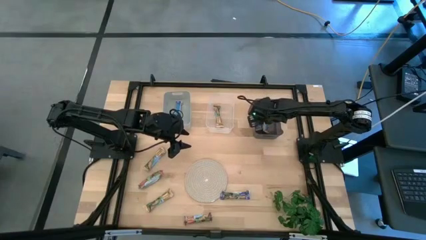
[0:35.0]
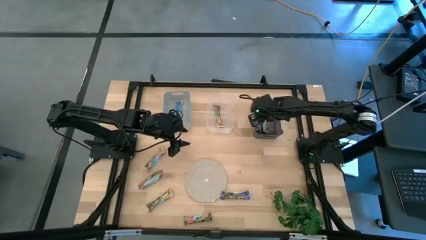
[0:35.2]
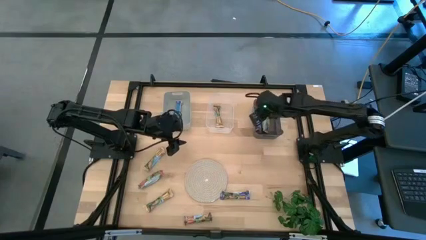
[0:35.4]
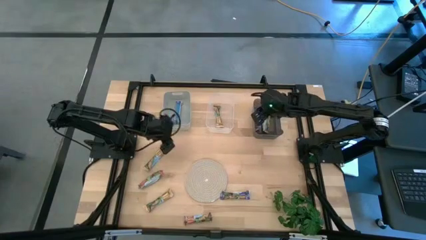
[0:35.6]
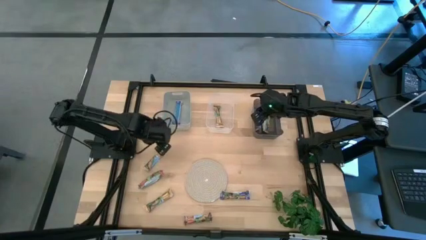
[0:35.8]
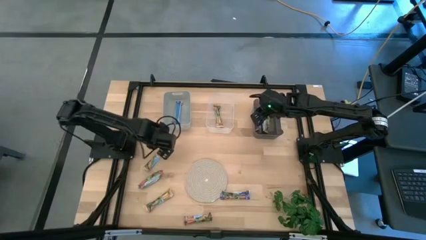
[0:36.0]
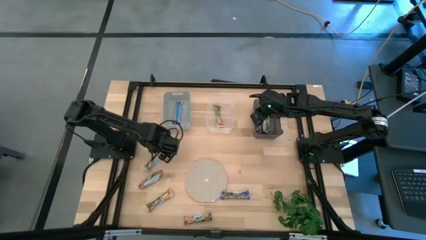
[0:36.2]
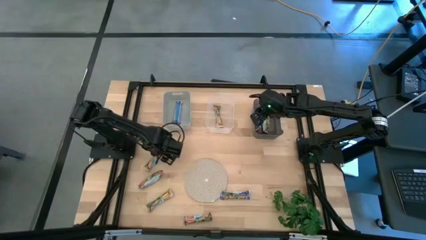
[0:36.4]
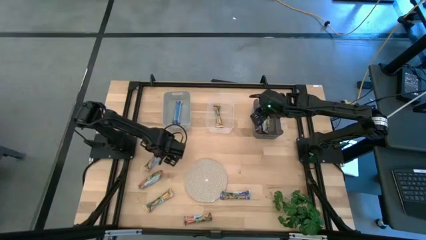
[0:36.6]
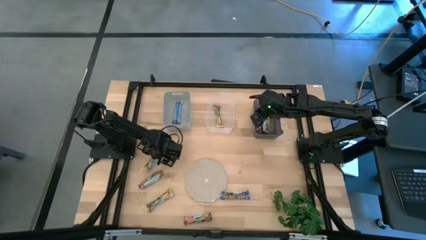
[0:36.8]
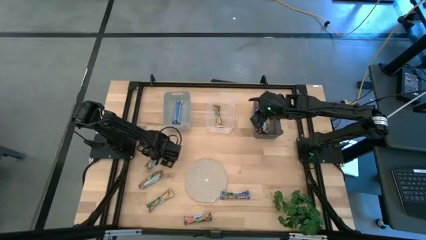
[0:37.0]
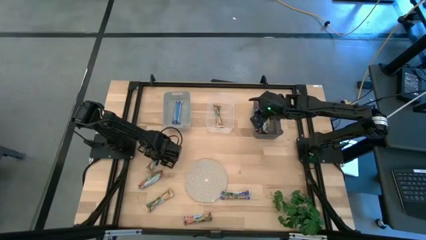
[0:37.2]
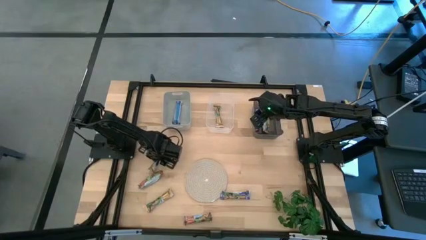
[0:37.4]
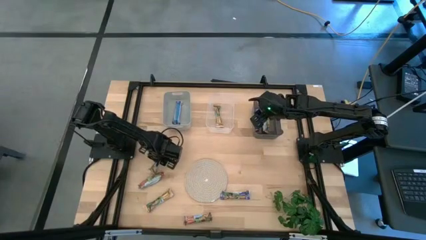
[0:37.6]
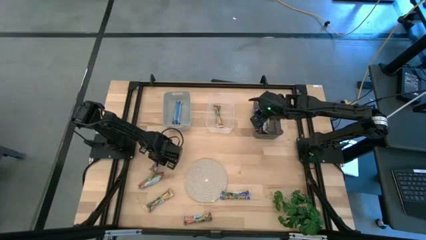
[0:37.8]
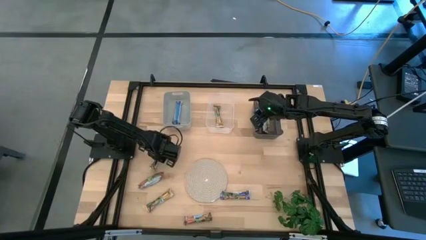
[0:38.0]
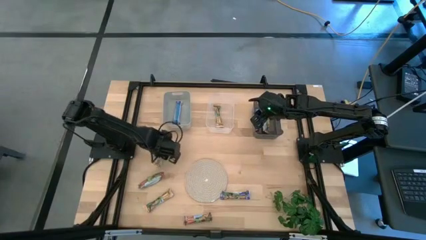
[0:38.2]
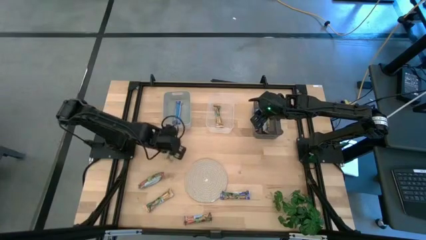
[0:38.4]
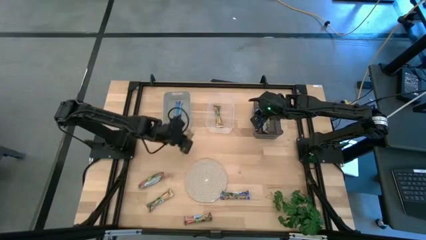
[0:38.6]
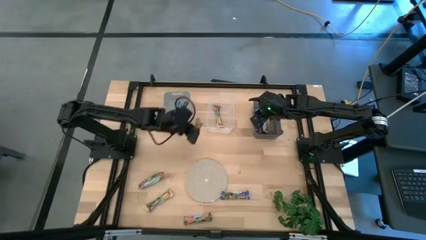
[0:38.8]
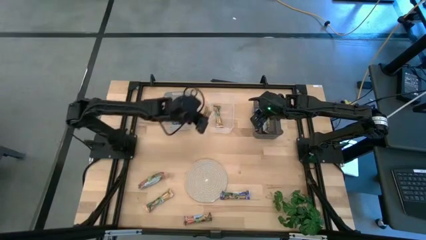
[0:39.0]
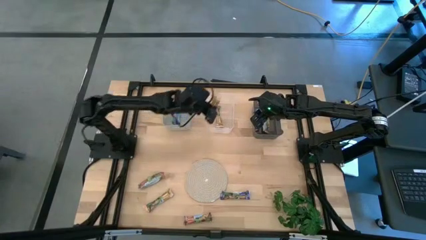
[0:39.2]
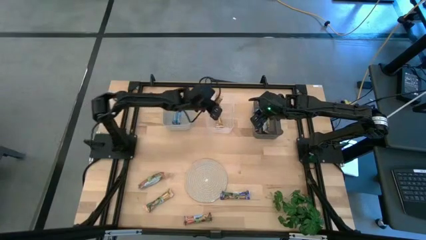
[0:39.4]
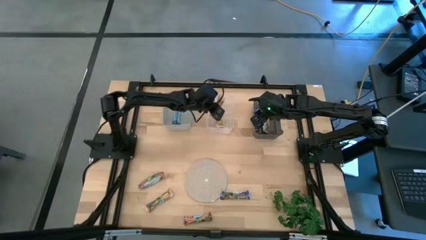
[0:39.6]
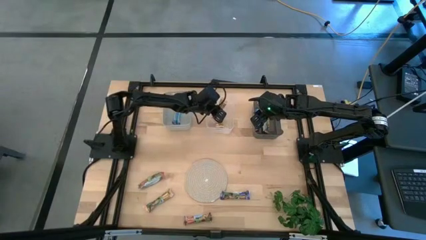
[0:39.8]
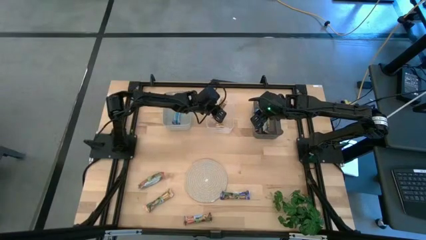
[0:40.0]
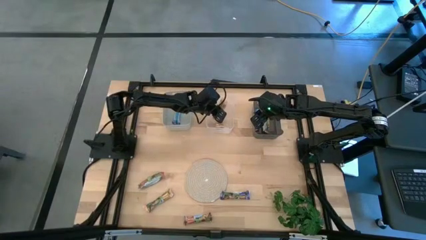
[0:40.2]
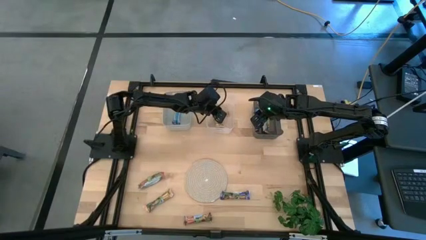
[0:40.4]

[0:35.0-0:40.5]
Task: Pick and place Granola Bars by type
Put the yellow granola bar into the transparent bin

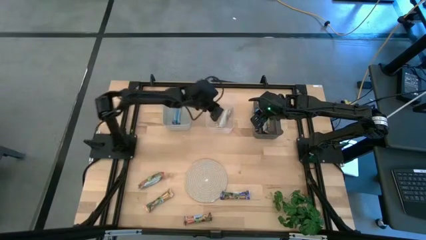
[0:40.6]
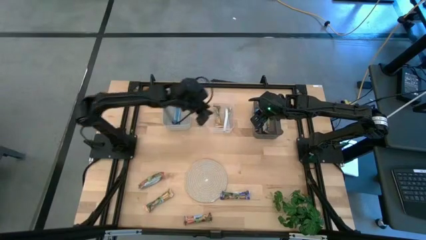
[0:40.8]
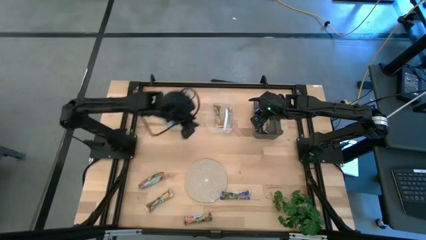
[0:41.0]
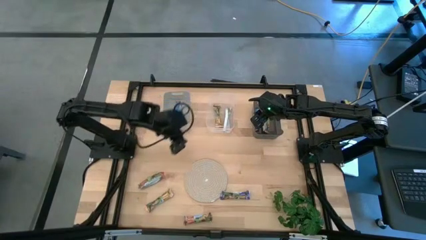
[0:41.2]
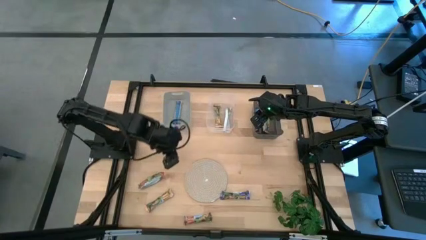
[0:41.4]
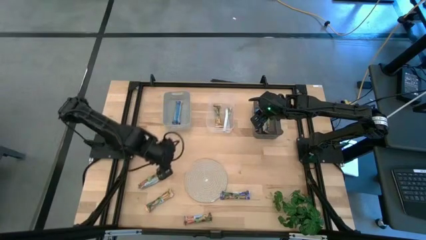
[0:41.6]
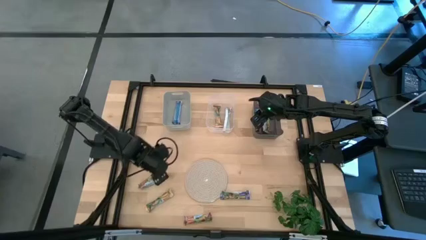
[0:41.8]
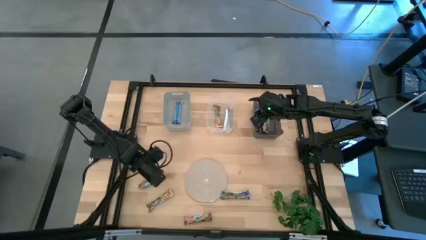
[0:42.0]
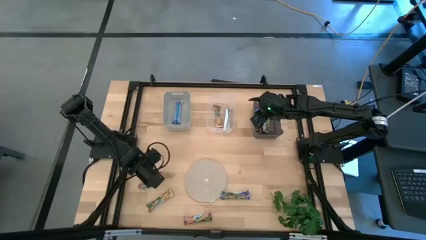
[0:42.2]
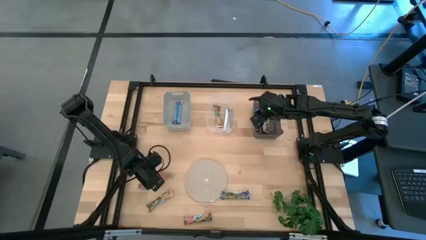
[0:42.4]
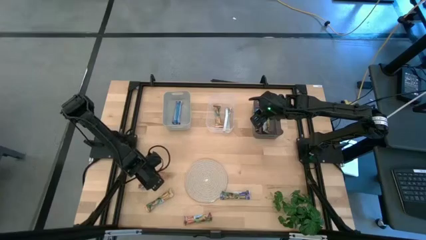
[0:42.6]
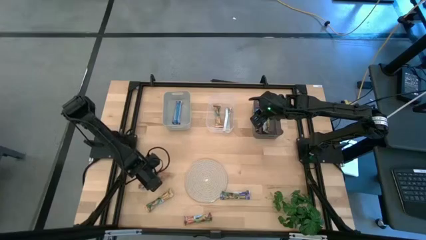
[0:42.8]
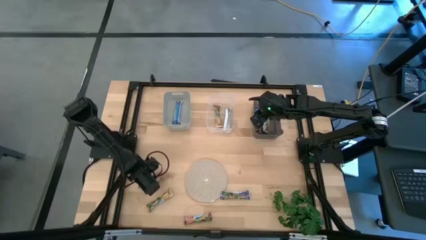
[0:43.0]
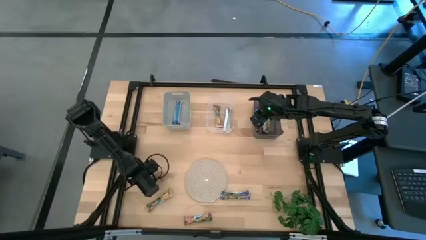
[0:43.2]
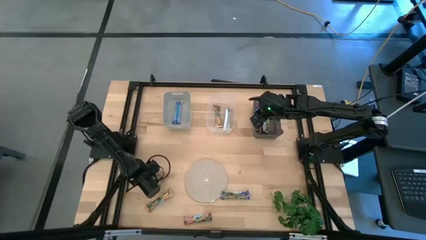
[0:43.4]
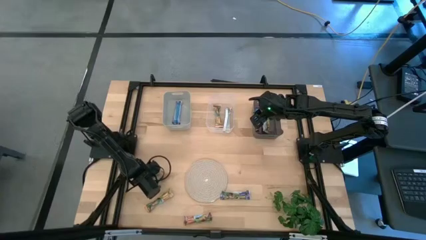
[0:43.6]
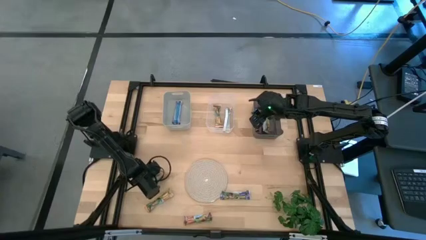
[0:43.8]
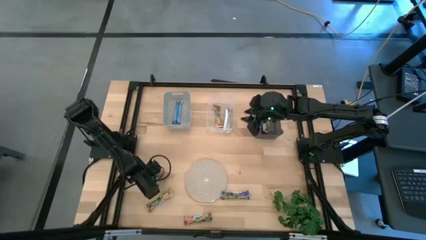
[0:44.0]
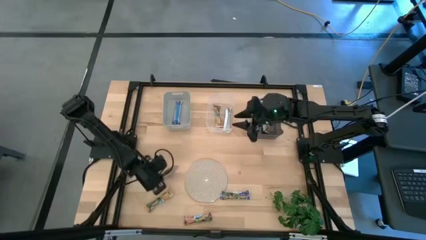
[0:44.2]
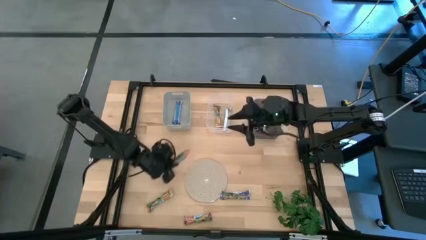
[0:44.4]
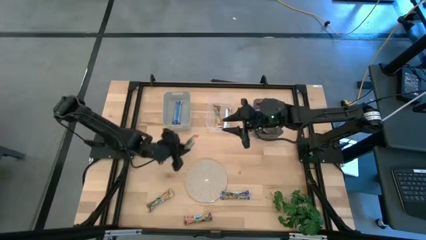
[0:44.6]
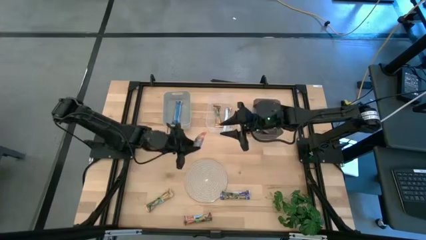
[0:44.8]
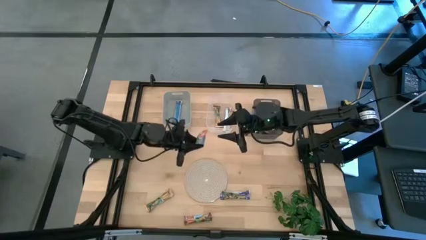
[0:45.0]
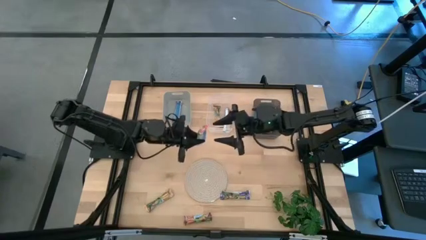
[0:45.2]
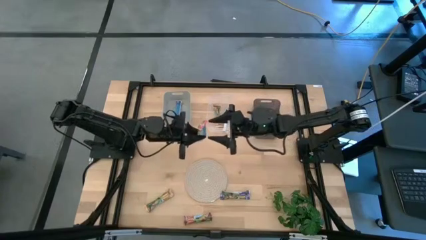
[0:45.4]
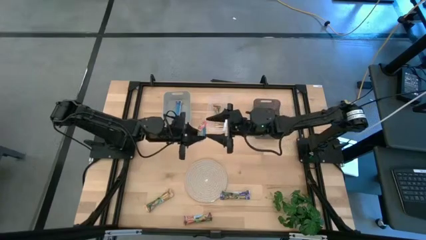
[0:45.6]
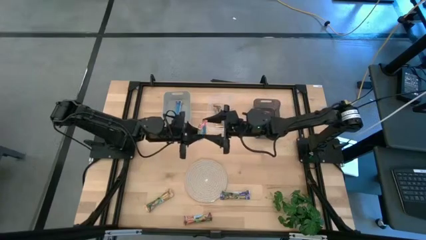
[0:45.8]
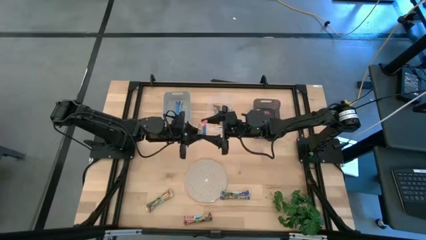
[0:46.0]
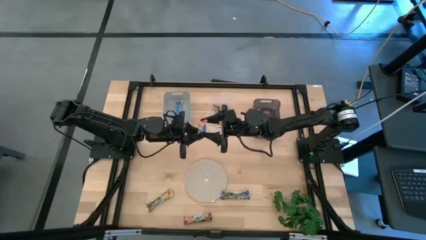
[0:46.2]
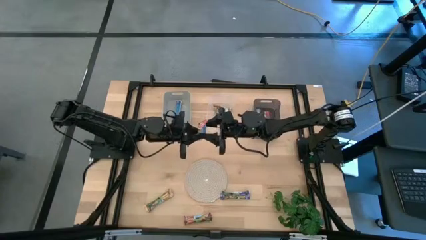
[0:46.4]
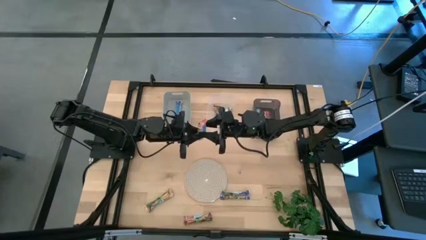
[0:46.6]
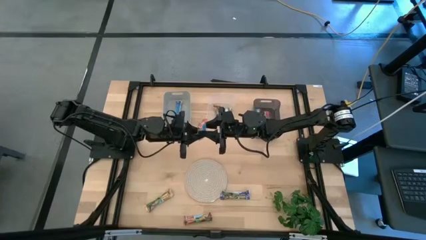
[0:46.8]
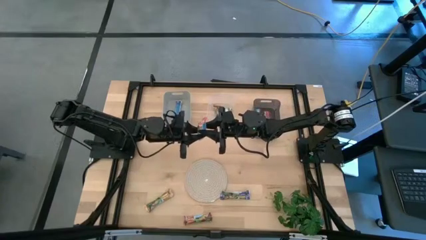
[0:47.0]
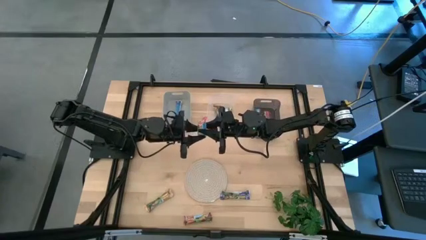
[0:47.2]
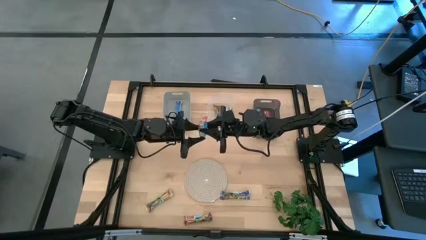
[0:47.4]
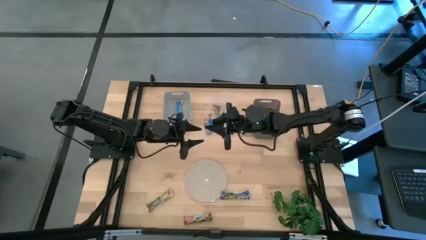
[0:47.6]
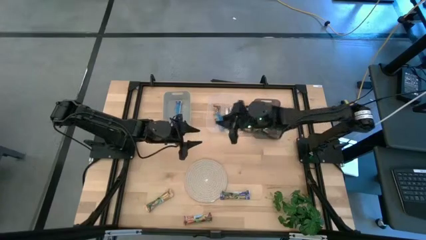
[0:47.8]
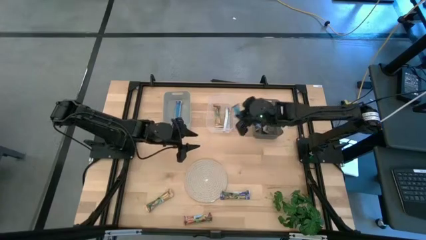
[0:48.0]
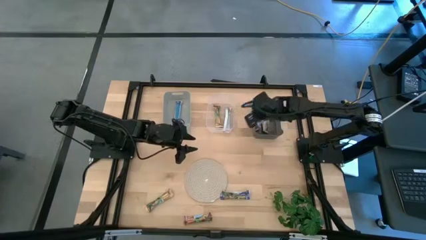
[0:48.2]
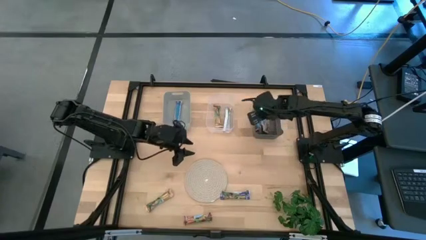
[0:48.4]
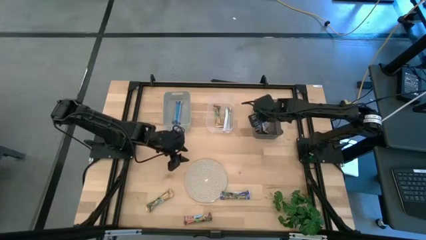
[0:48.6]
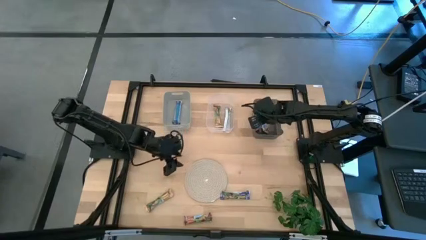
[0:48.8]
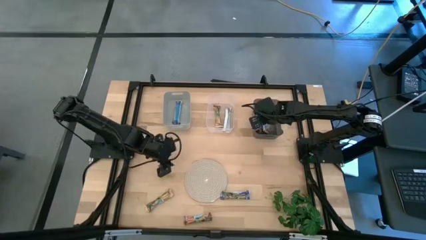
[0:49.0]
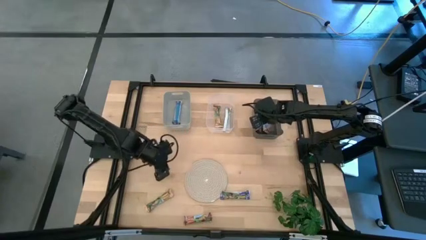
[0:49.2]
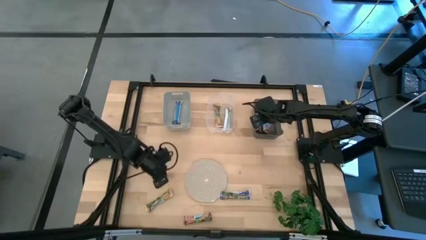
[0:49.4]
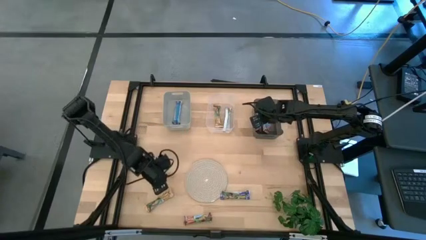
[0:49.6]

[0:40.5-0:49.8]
Put the red granola bar into the black bin

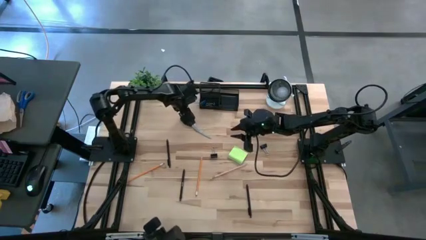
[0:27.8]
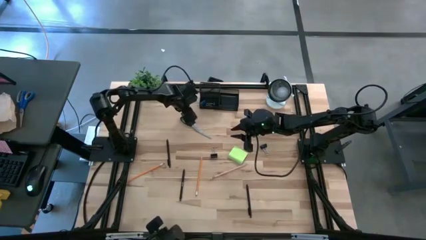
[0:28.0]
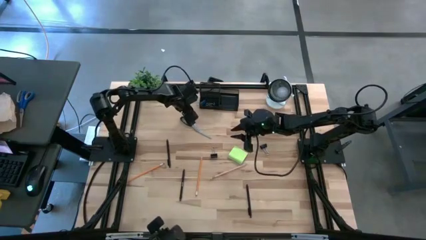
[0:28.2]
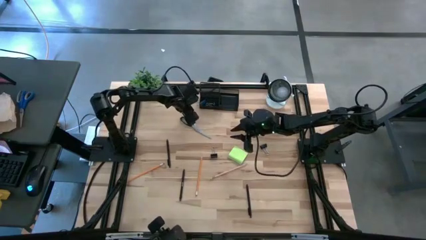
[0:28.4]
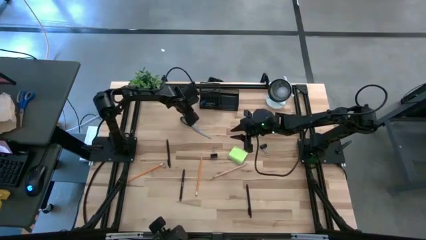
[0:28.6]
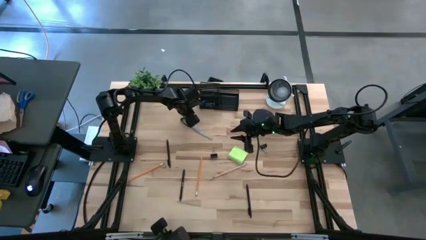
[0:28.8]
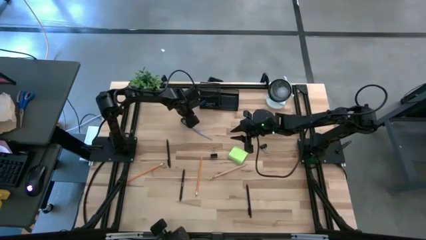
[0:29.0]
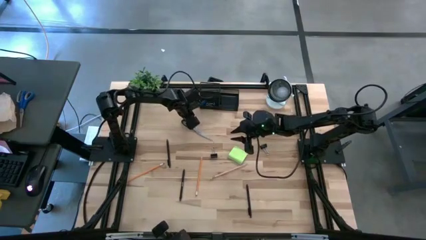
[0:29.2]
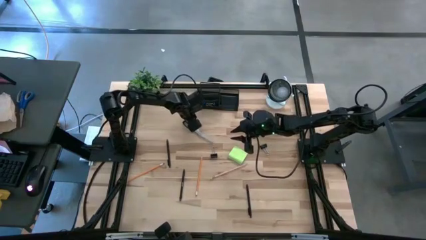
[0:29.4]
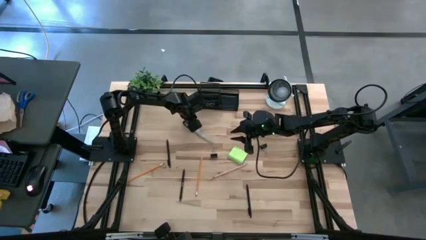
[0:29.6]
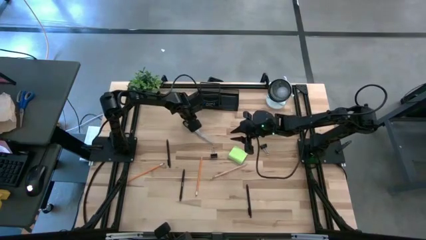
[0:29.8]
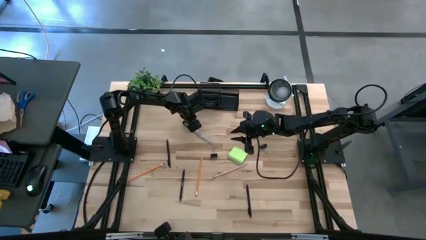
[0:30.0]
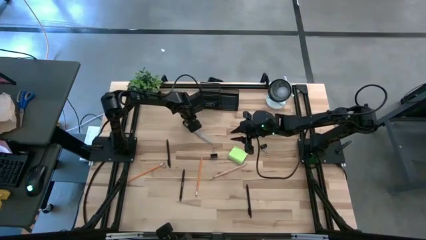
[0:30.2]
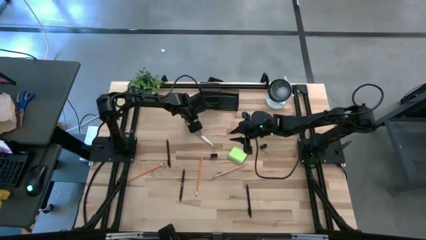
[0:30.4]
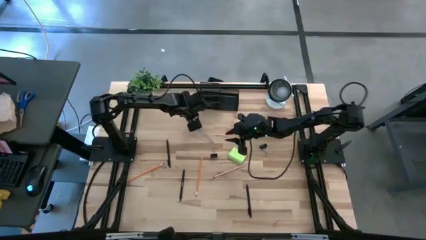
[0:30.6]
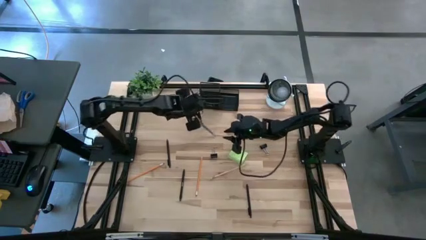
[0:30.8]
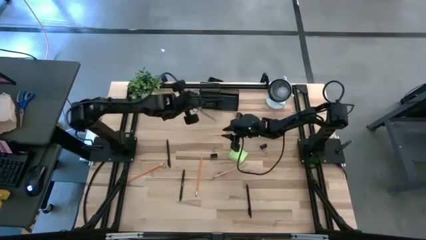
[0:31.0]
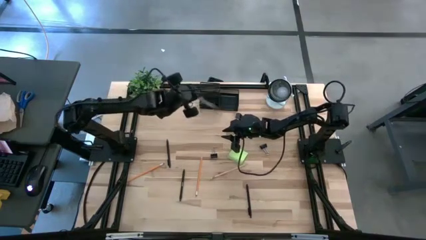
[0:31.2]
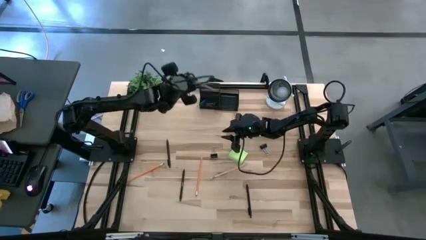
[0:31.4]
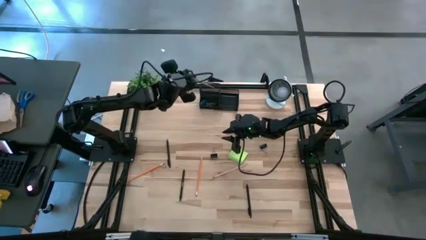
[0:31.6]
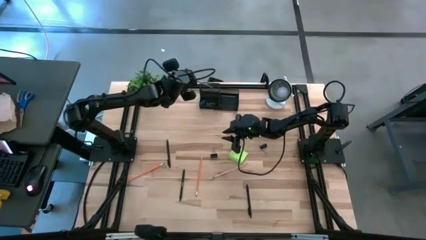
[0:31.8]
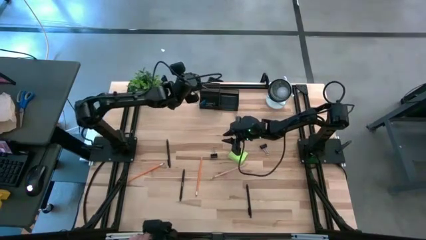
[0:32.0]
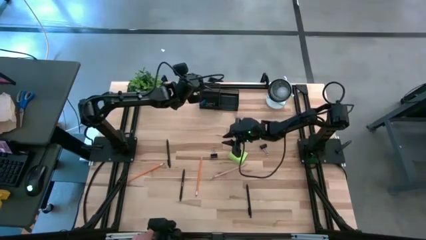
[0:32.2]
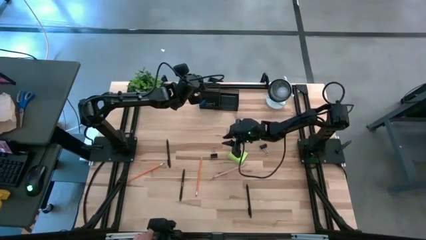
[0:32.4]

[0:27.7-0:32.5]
Task: Pick and place office supplies into organizer
Put the black scissors into the black desk organizer
